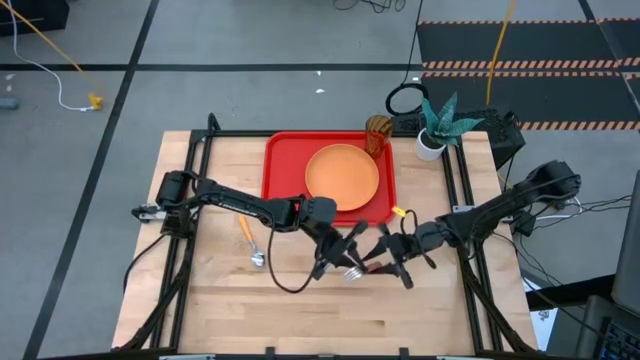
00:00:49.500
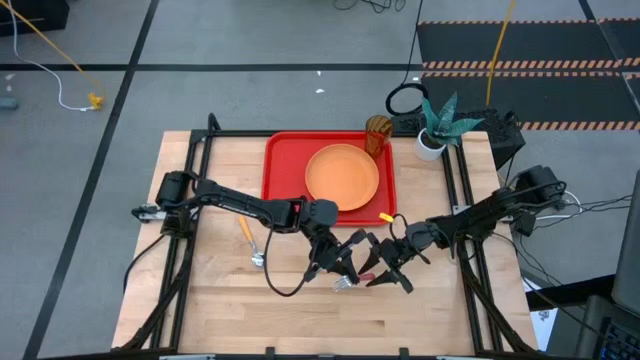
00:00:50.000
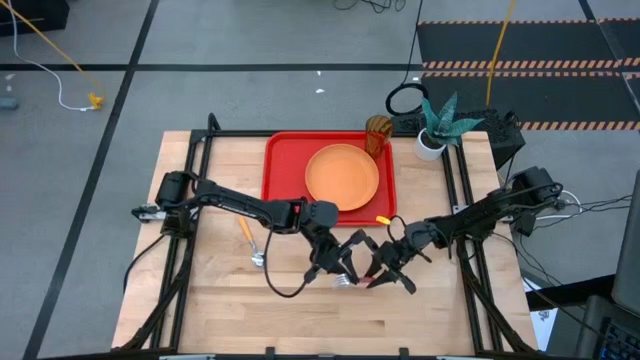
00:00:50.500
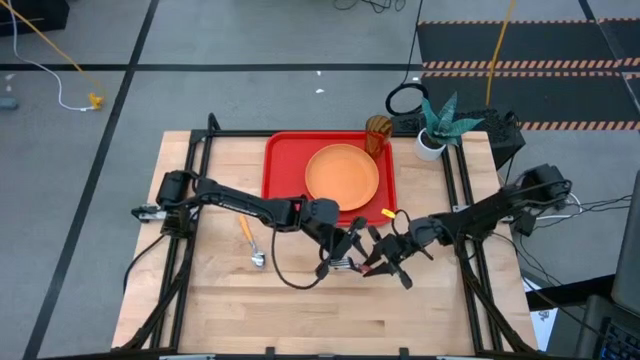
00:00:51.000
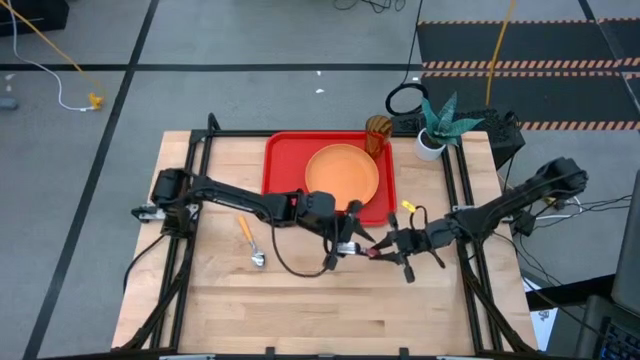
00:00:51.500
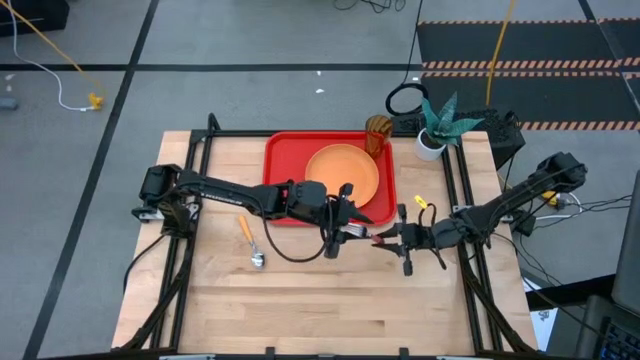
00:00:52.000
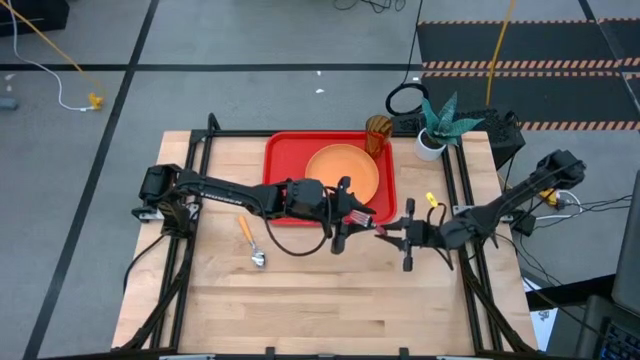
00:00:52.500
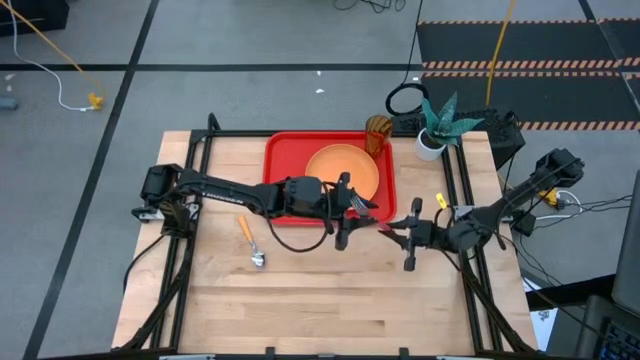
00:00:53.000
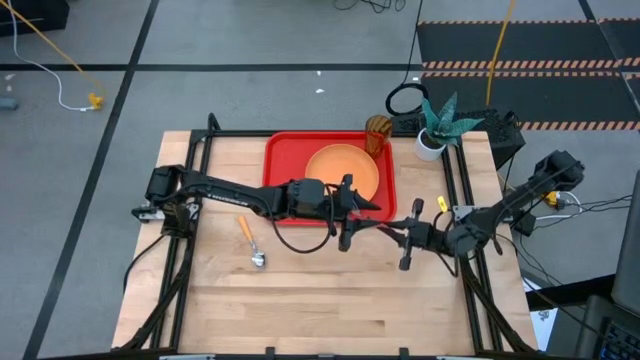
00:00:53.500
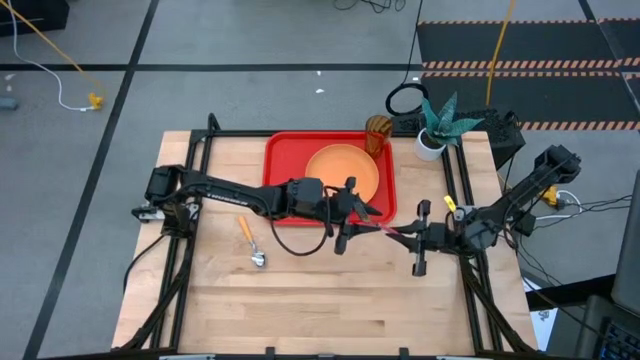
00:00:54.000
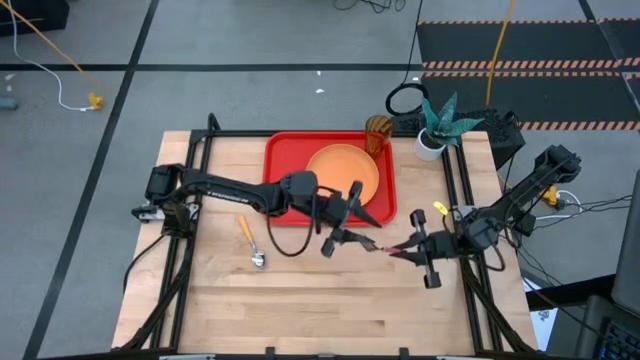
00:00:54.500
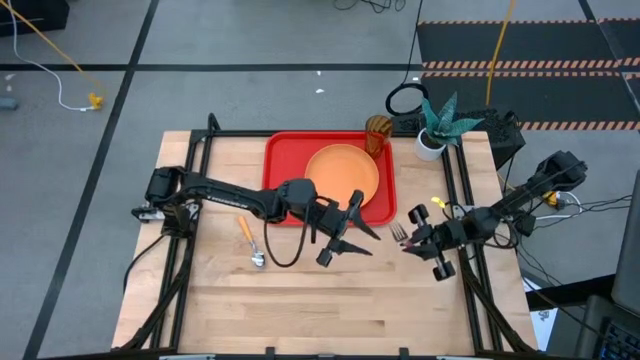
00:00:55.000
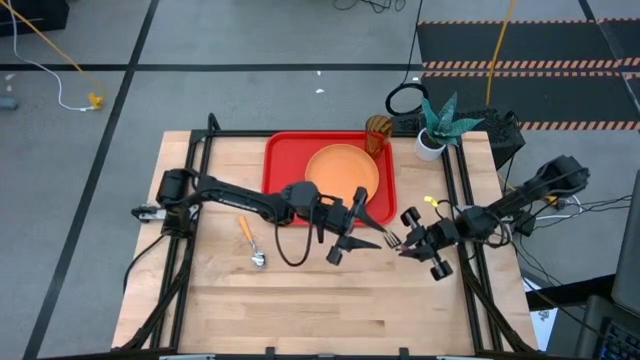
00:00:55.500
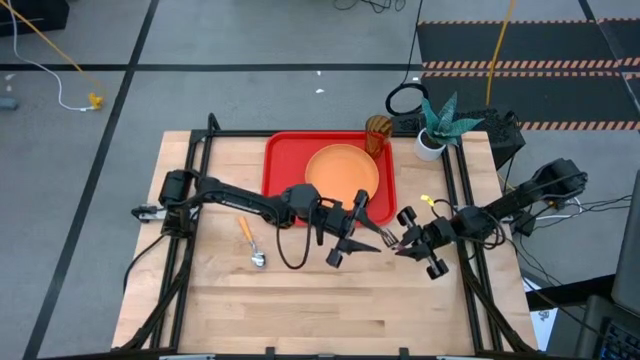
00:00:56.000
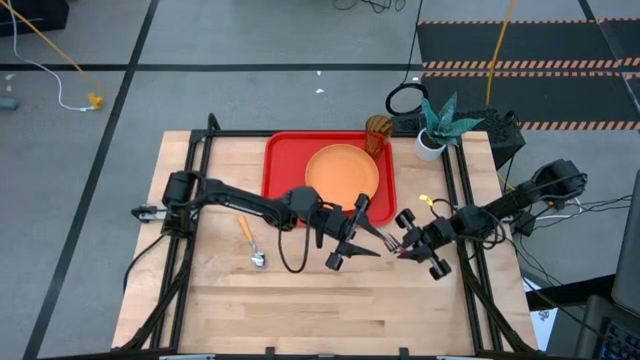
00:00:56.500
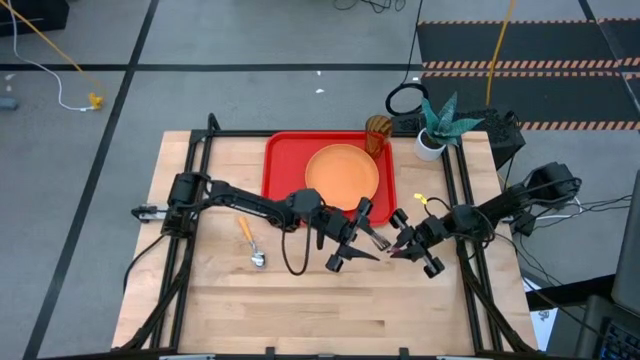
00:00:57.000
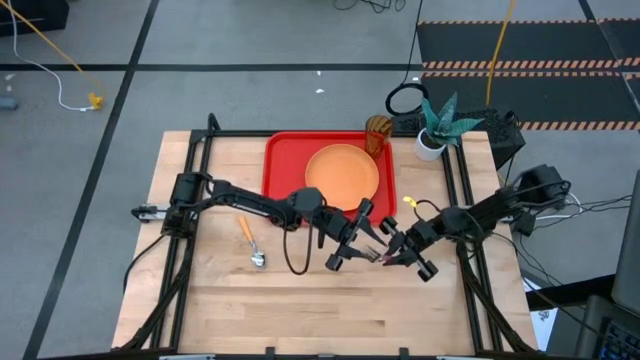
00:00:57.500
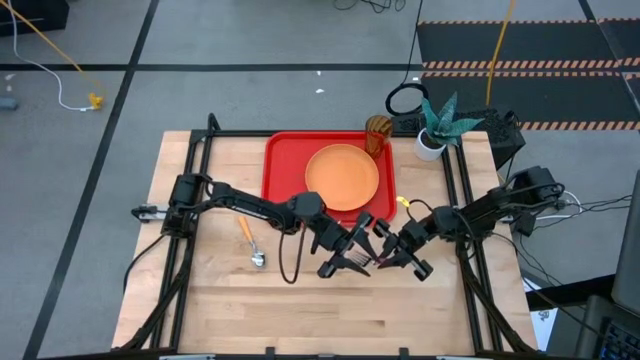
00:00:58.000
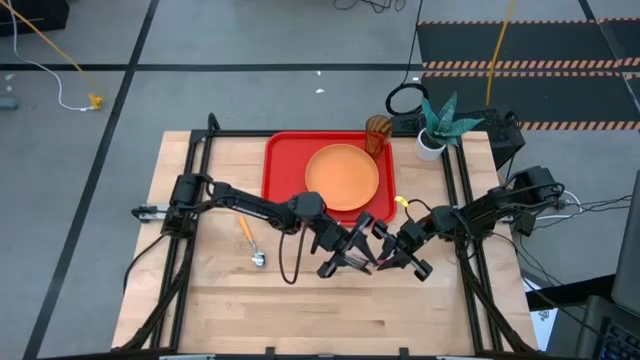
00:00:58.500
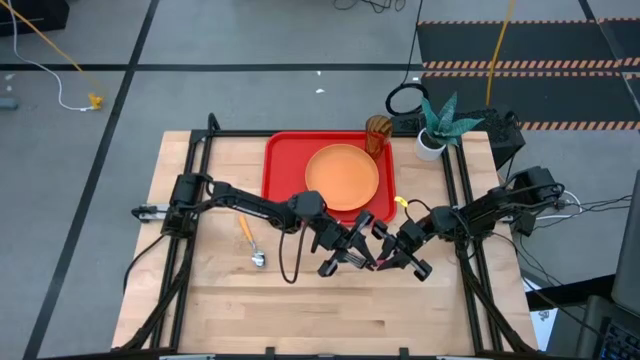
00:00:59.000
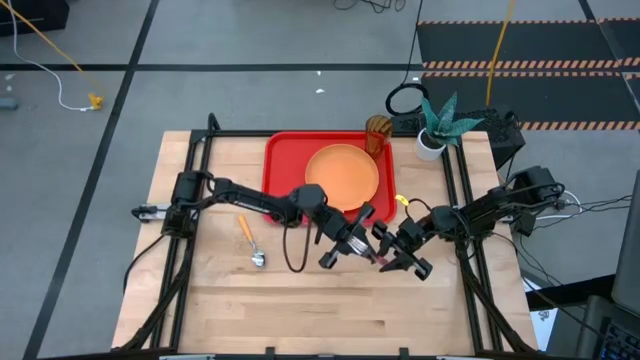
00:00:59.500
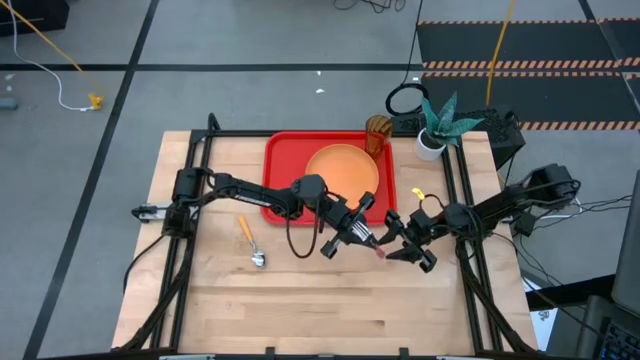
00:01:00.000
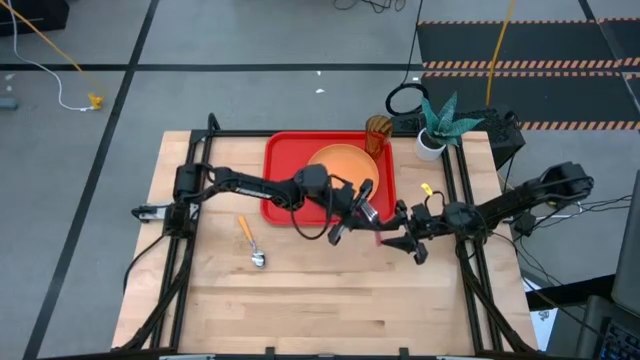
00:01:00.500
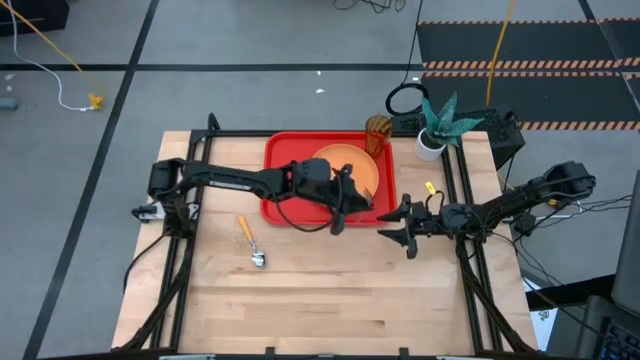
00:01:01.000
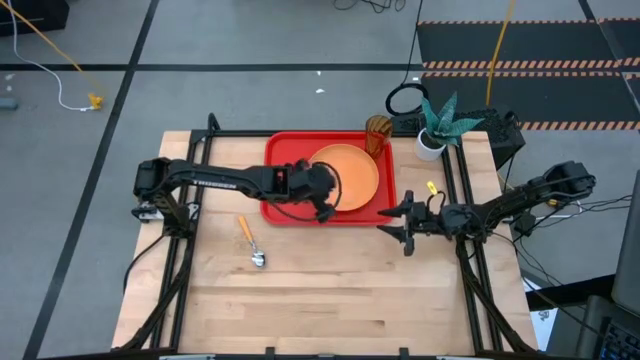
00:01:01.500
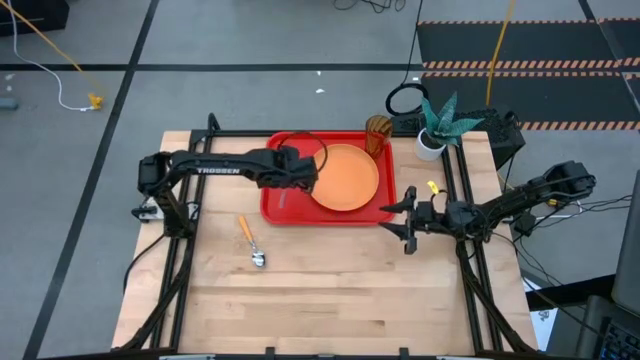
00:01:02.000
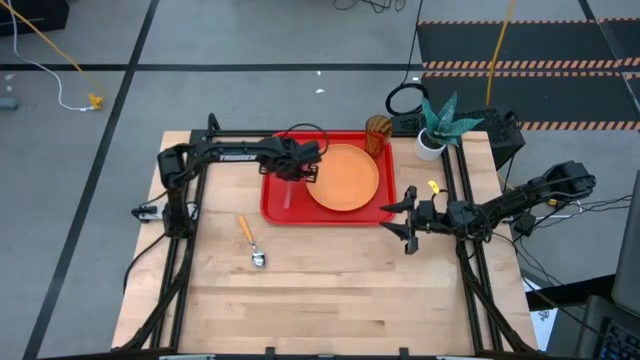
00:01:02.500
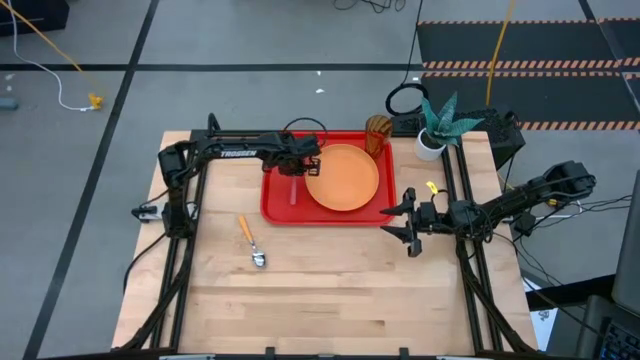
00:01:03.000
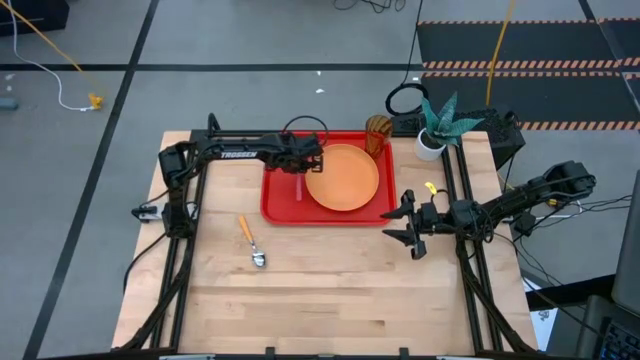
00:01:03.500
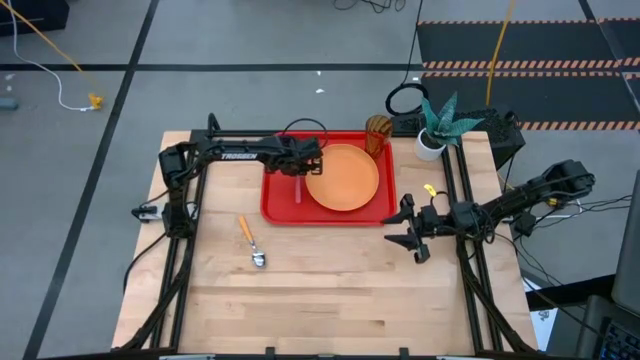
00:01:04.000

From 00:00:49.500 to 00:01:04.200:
Task: Pick and place plate/cup/fork/spoon on tray
Put the pink fork on the red serving tray to the left of the orange plate

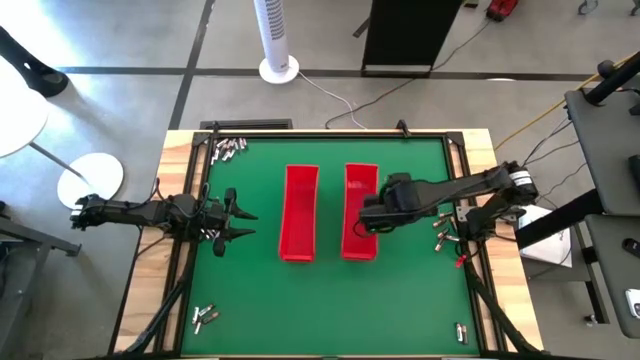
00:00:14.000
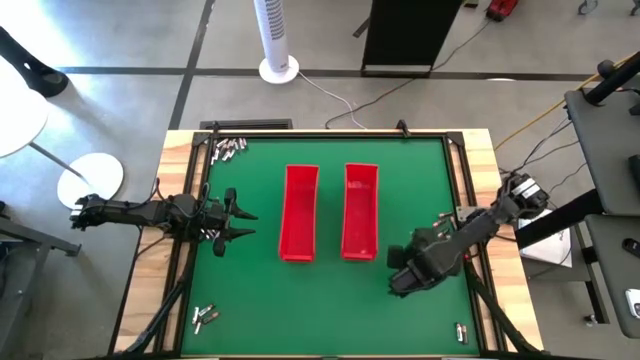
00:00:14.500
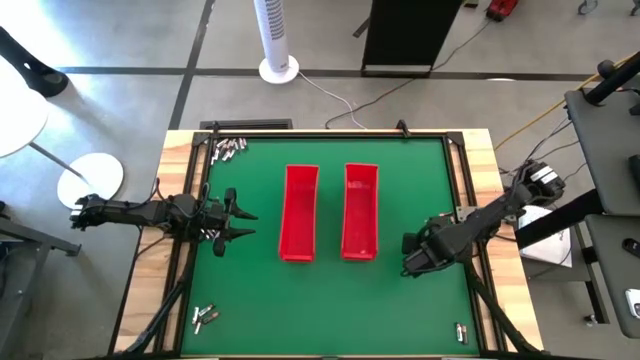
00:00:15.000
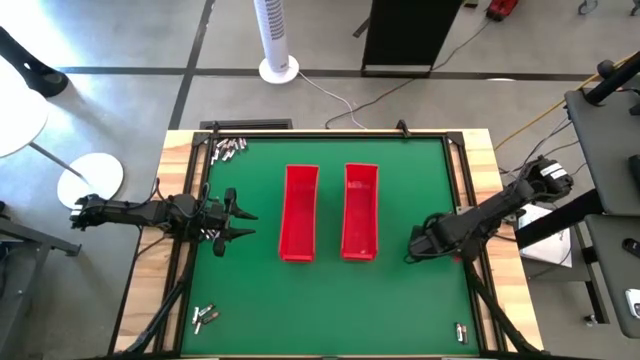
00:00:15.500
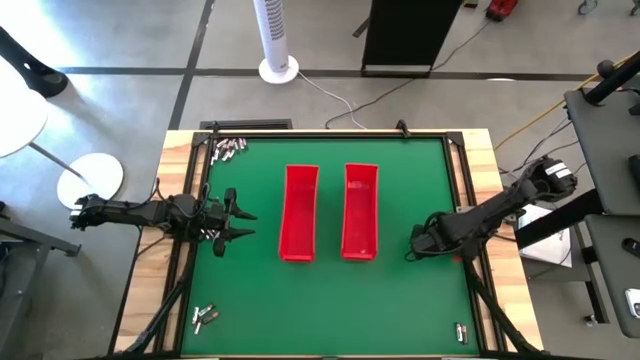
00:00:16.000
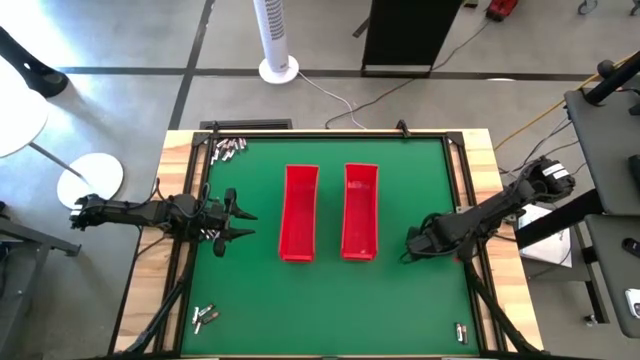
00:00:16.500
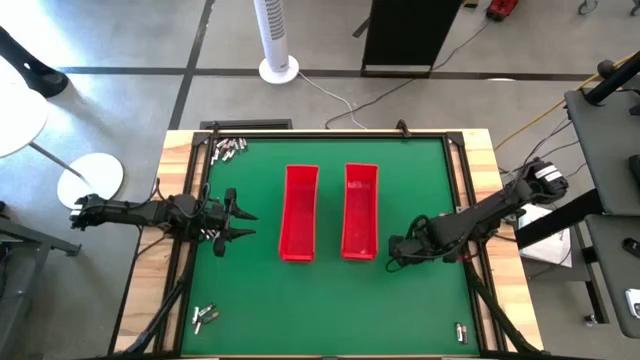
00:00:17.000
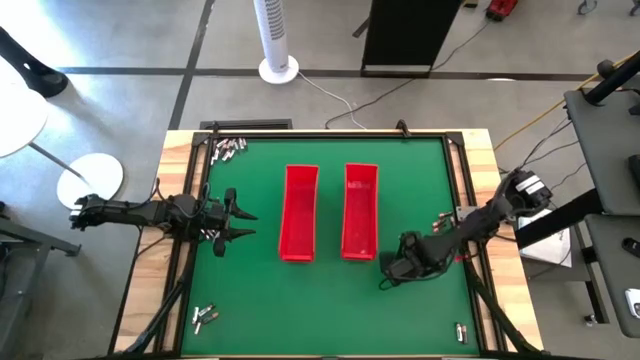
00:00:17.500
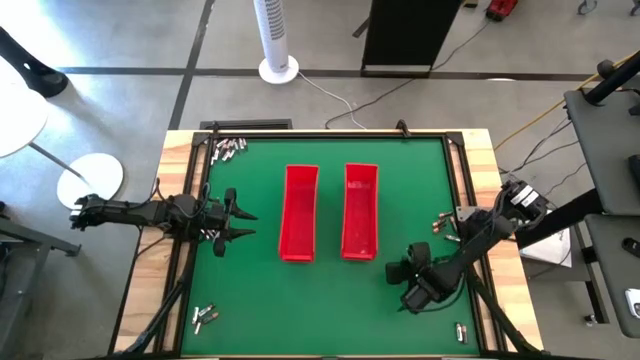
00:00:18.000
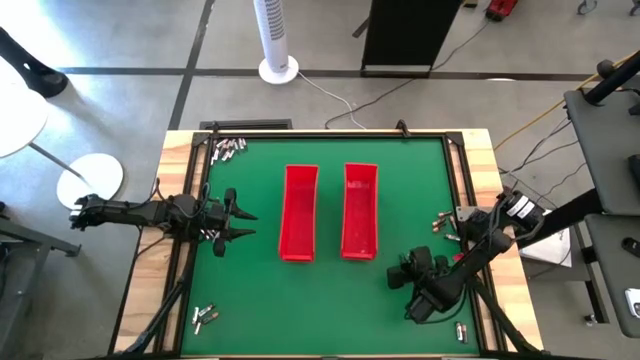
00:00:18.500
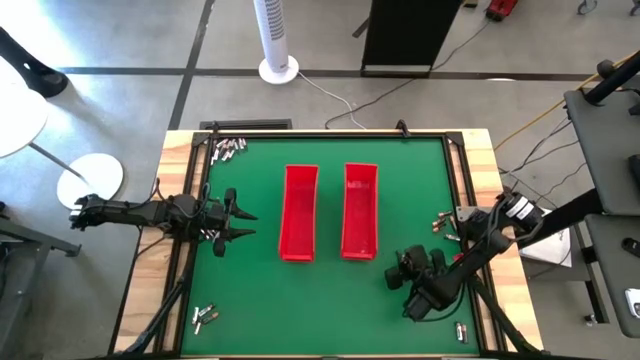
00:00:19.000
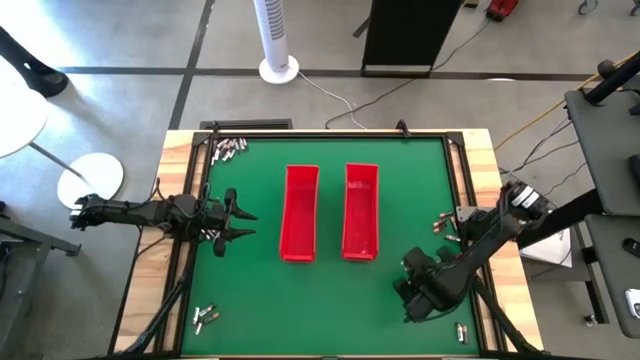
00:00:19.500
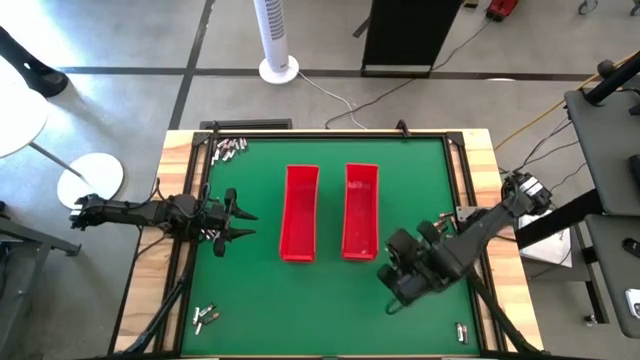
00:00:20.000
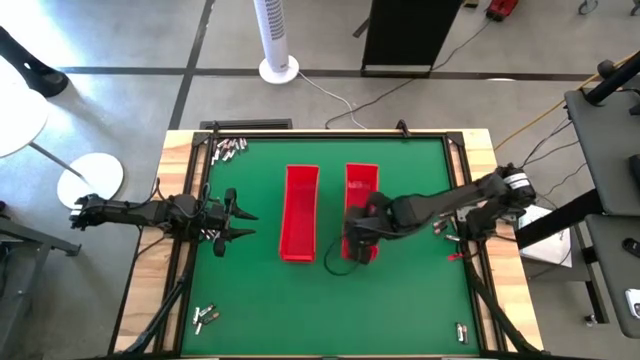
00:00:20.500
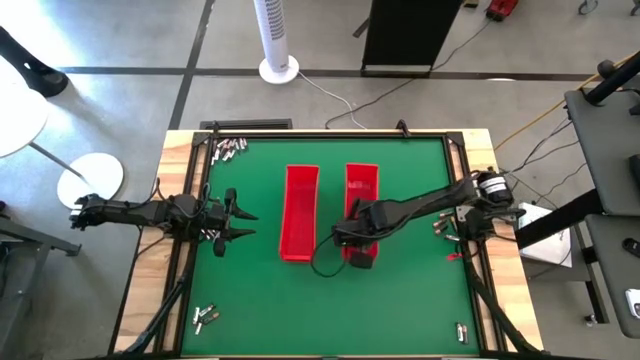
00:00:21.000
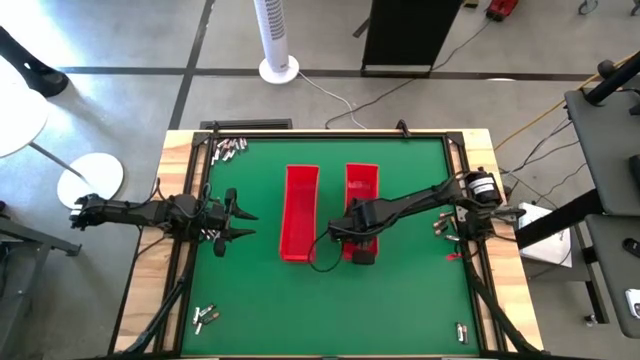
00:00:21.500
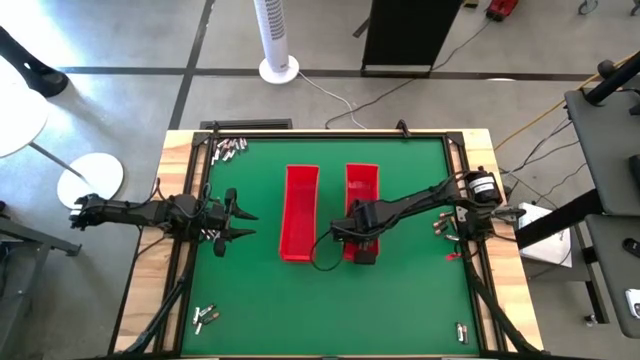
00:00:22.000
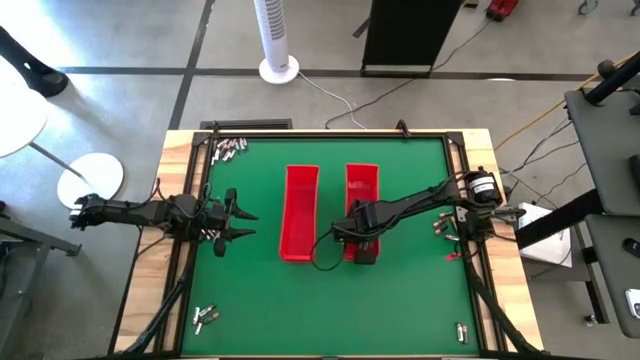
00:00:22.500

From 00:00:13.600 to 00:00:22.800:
Task: Sort batteries
Put the black battery into the right red bin
